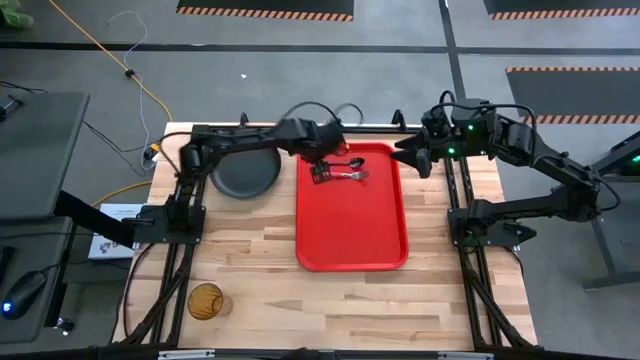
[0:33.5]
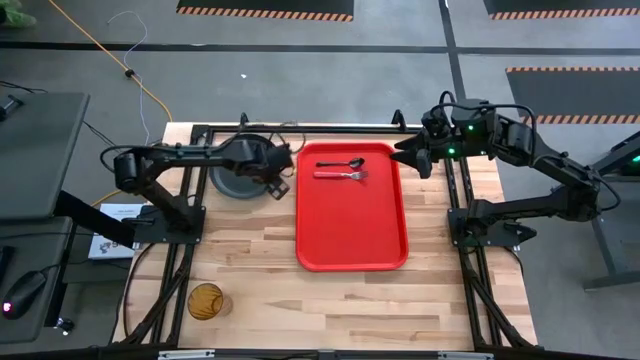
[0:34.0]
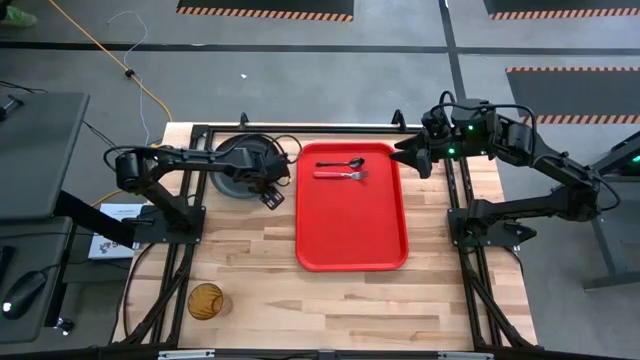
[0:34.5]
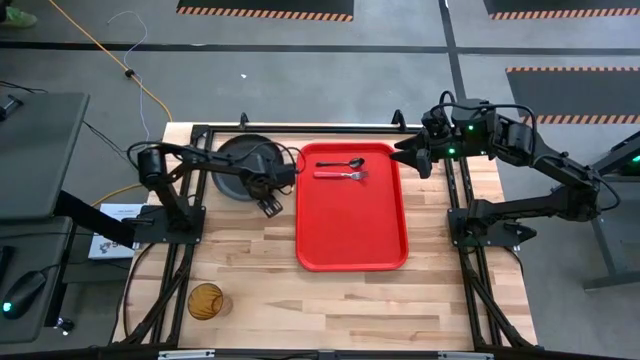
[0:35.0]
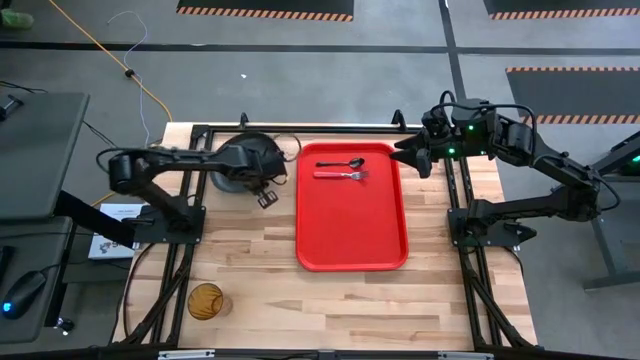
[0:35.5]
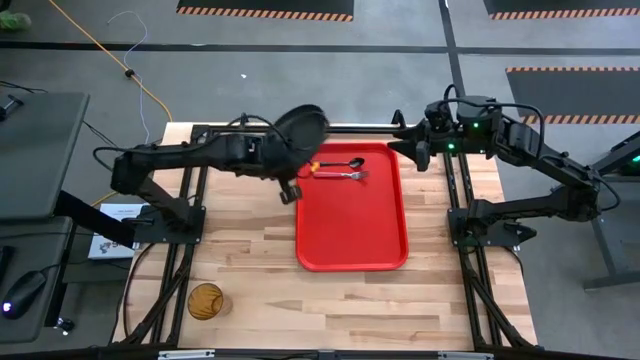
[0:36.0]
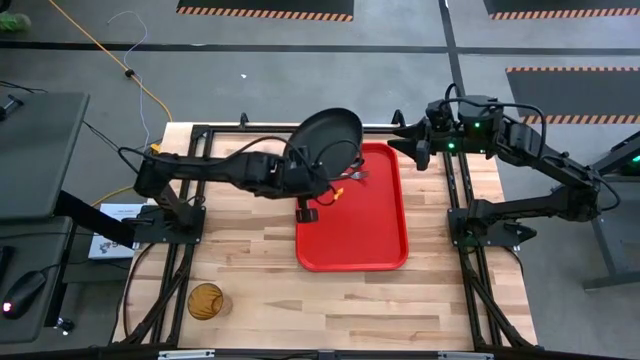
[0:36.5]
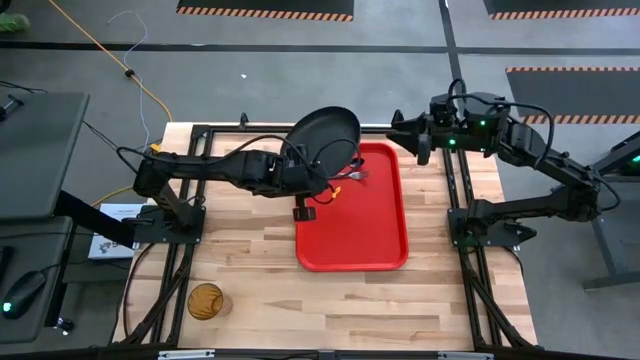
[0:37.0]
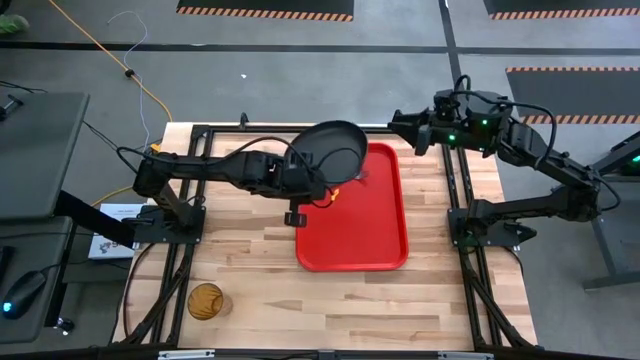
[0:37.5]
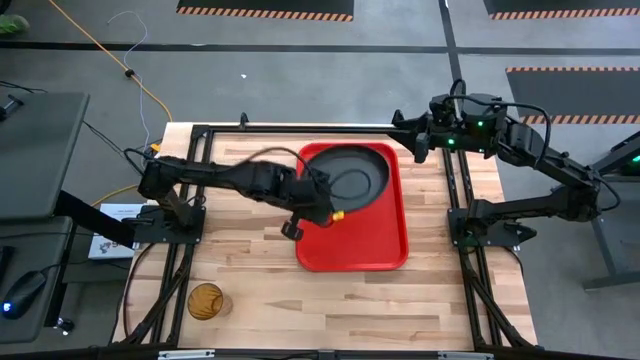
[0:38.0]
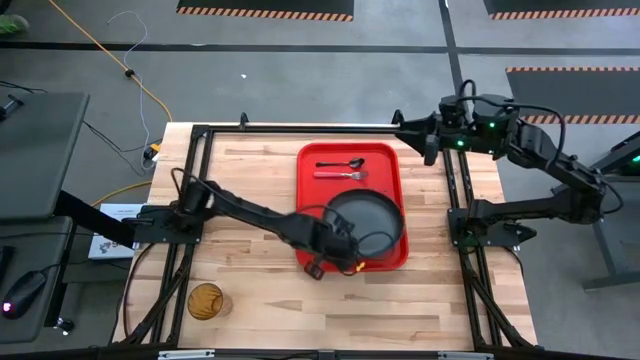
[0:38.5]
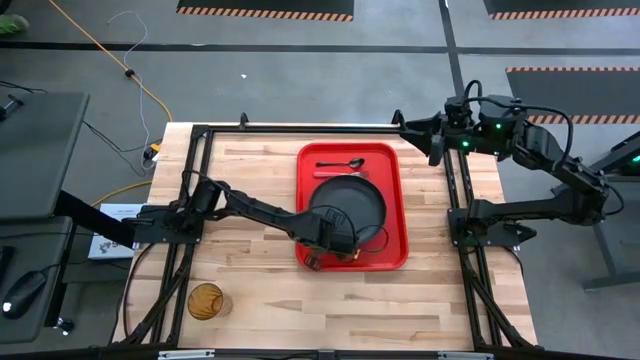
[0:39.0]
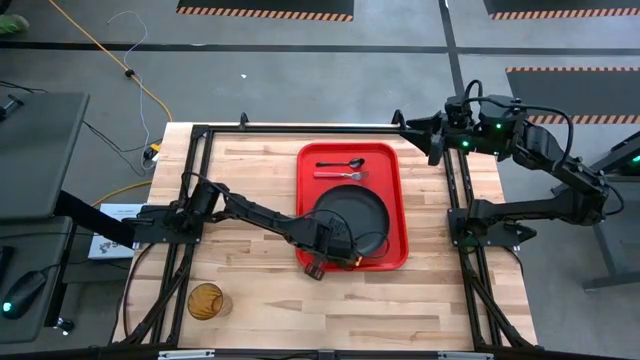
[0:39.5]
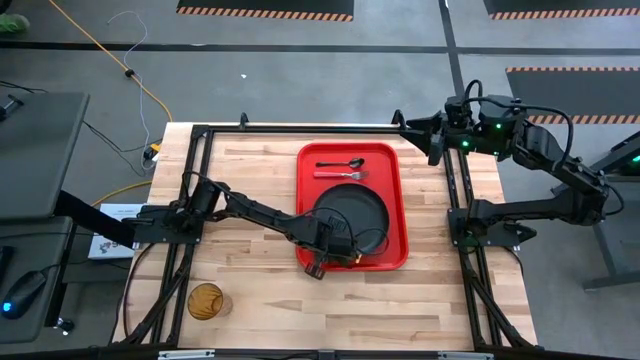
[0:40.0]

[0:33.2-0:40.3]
Task: Pick and place plate/cup/fork/spoon on tray
Put the black plate to the bottom of the pink fork on the red tray
